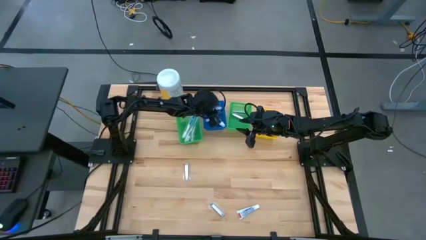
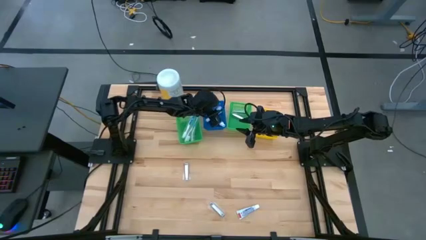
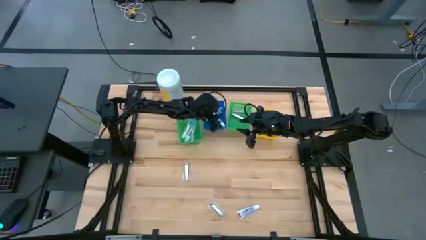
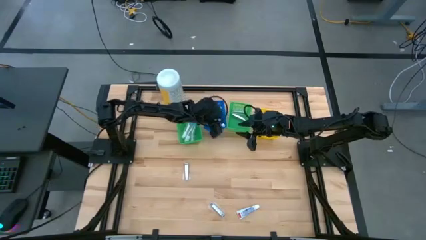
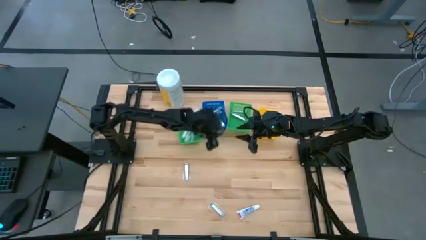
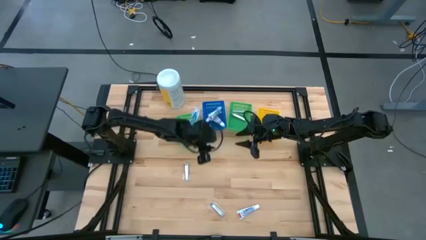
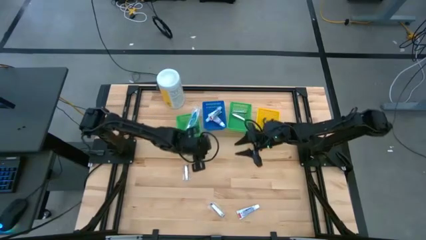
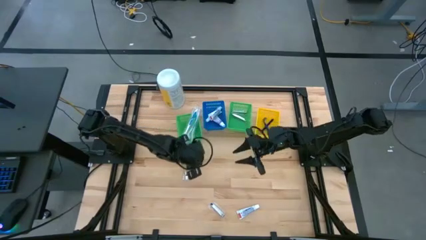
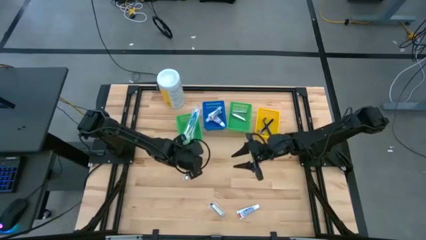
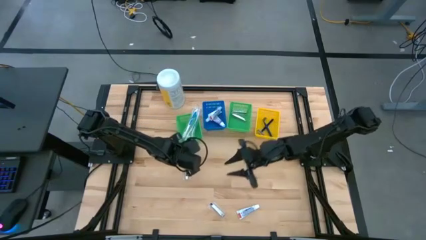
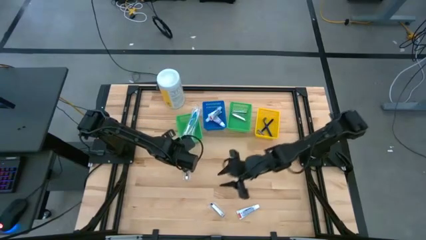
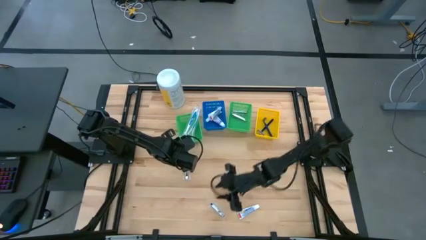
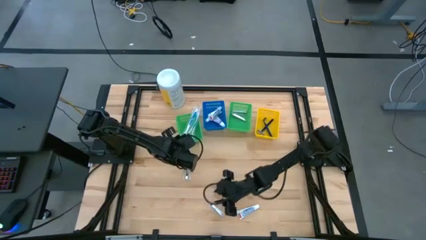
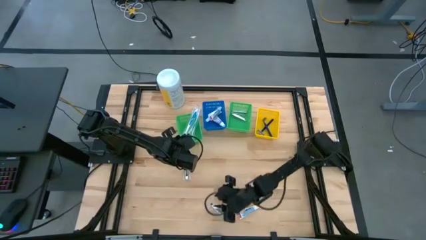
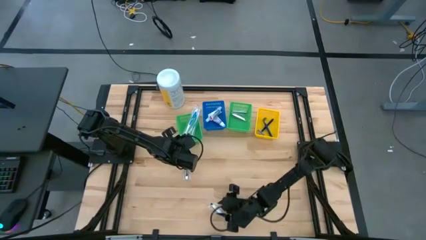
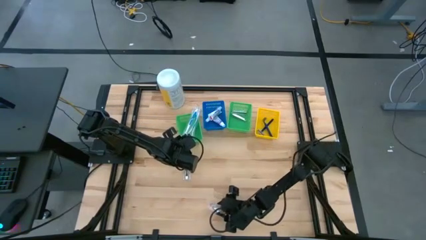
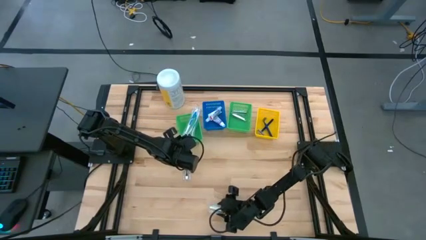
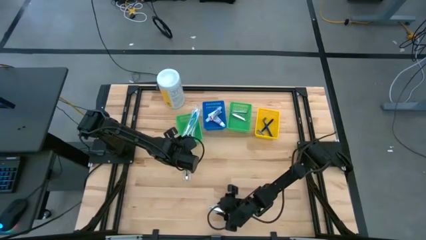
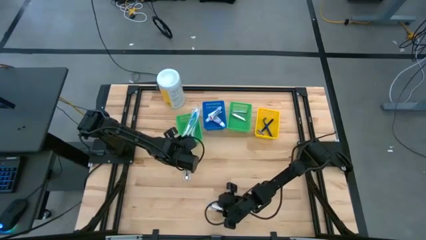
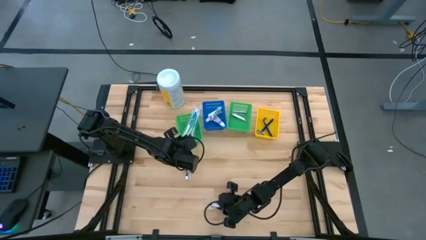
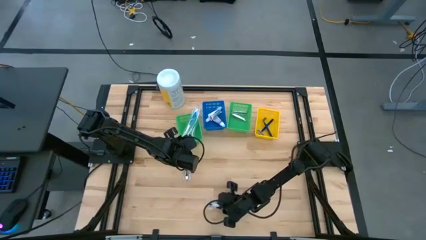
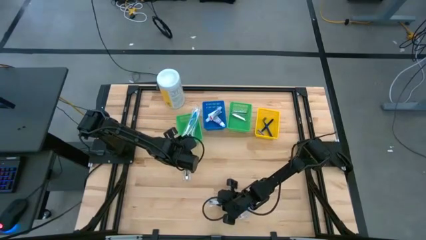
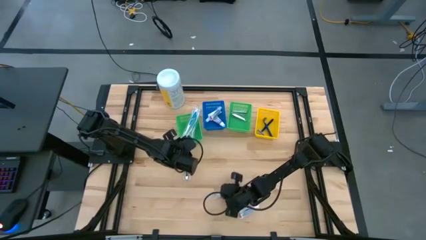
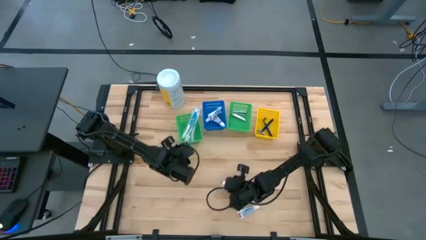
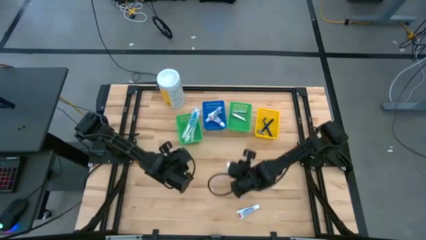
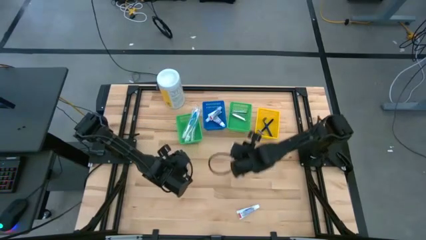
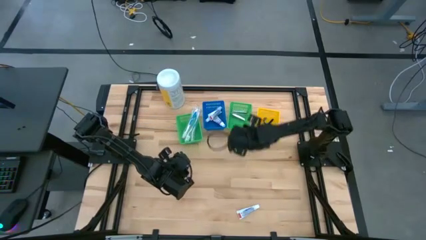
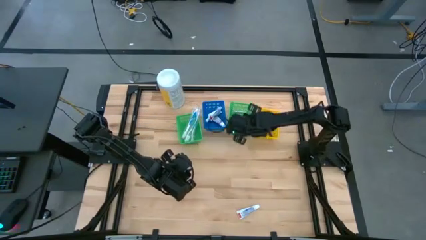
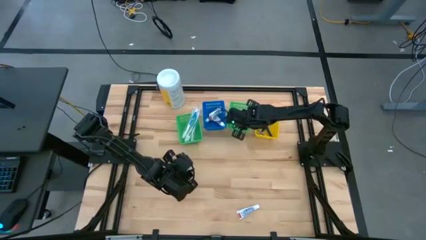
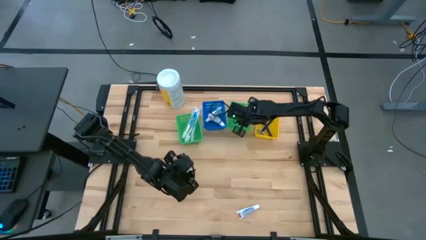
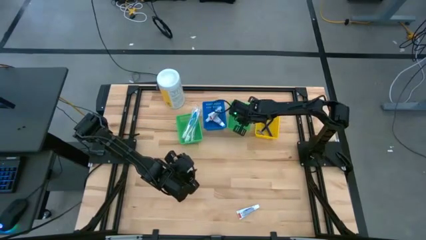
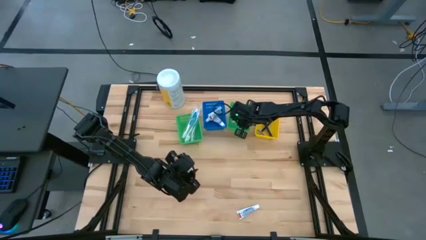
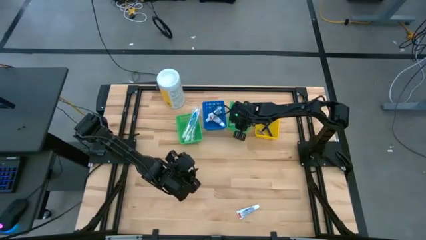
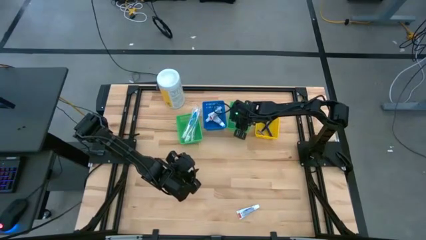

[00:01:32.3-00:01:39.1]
Task: Pick & Place Travel size toiletries
Put the silver nail cutter into the right green basket

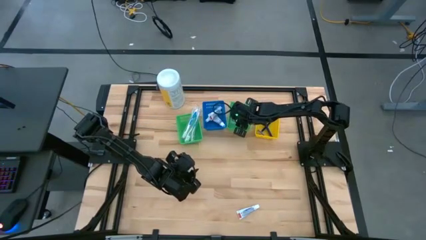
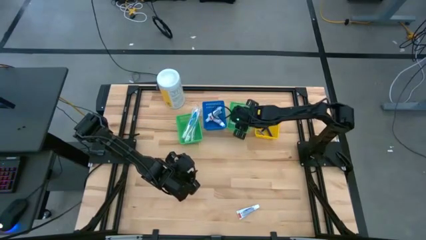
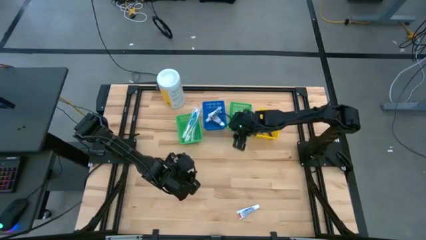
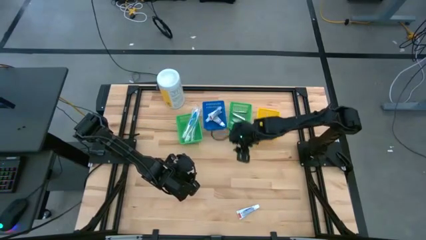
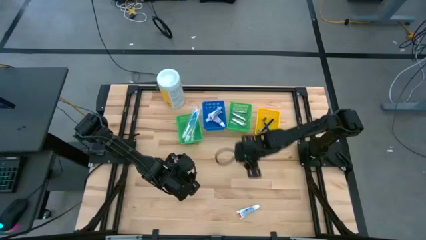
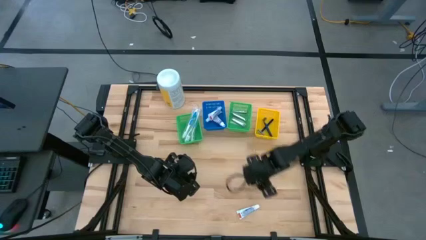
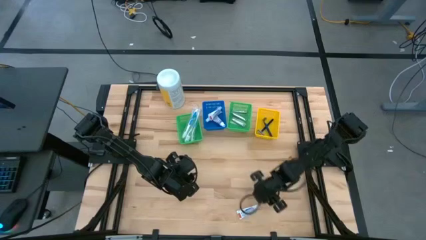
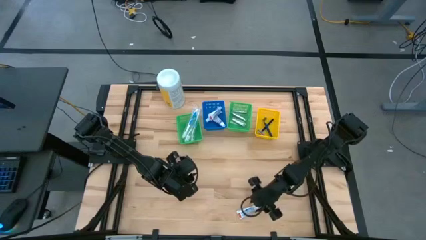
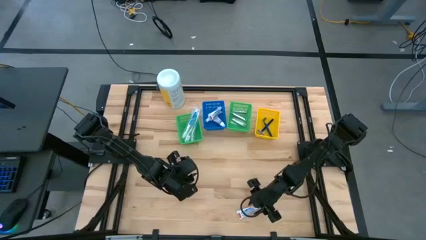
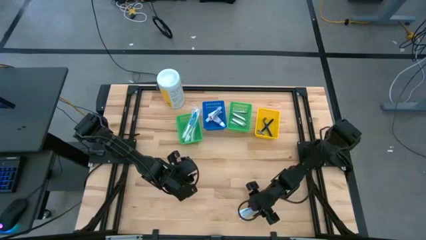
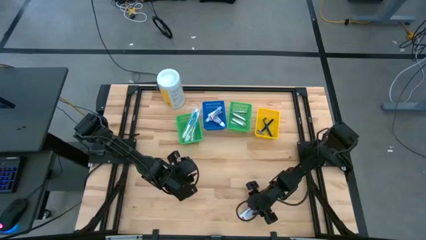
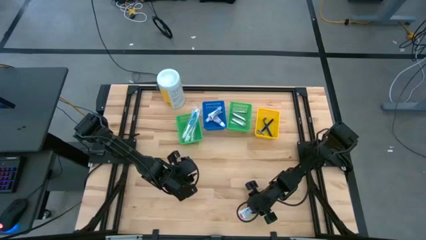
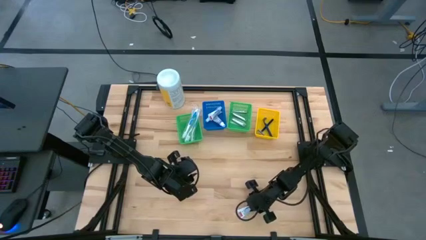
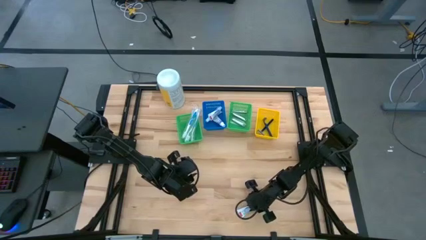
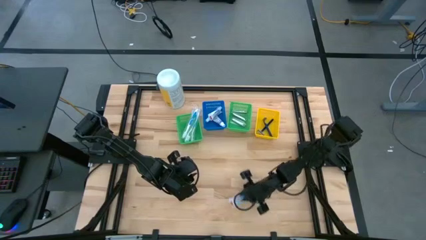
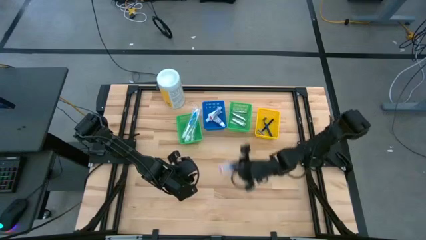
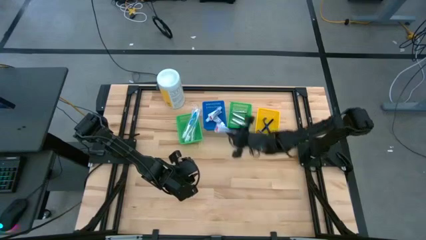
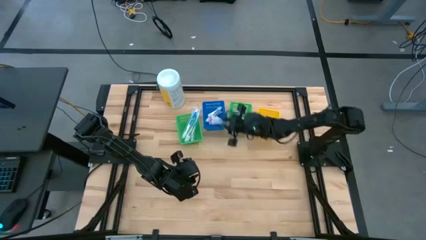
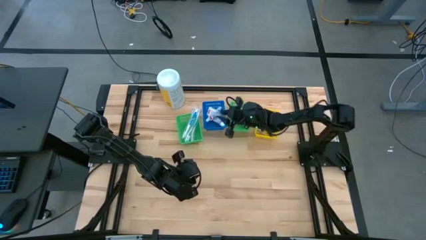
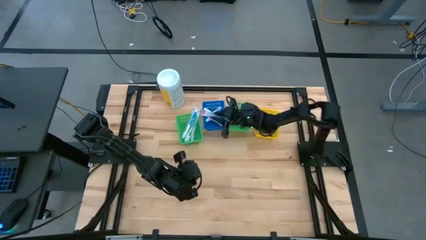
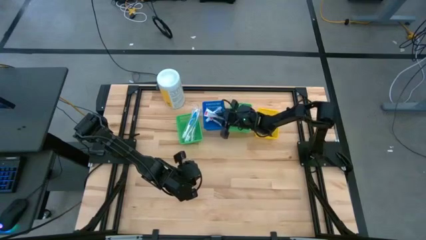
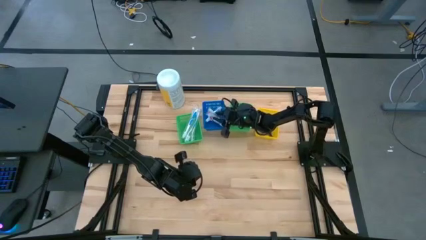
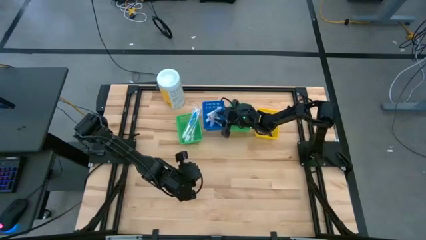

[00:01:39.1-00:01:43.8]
Put the white toothpaste into the blue basket

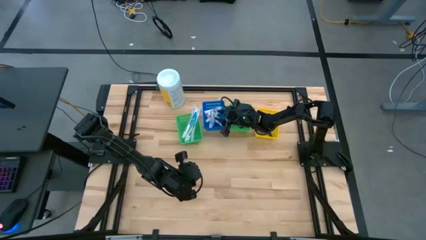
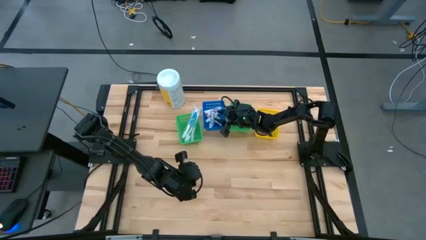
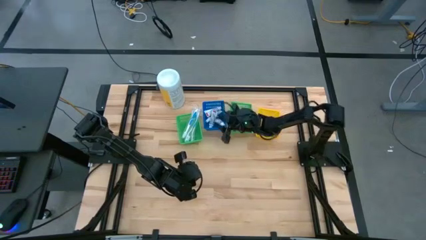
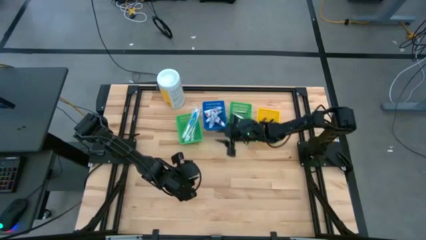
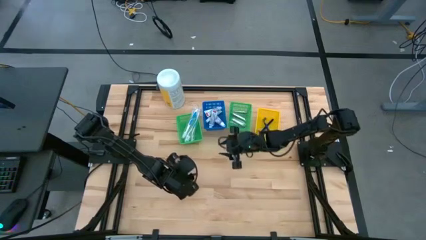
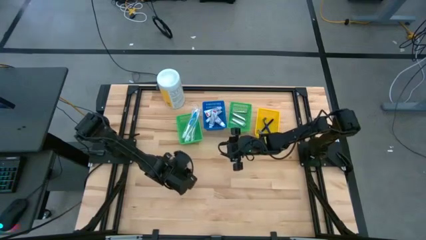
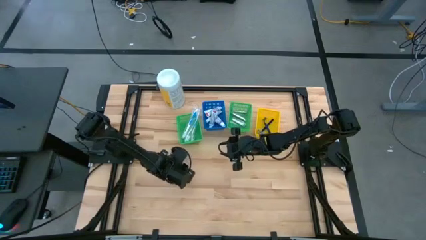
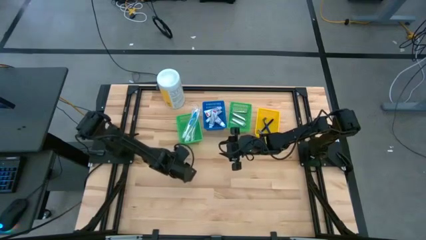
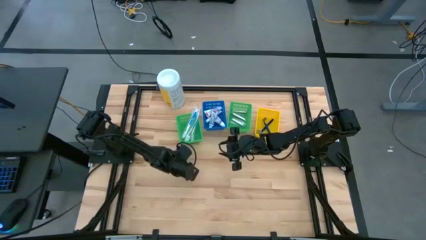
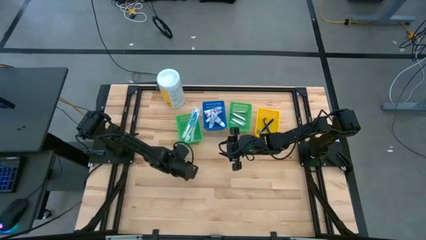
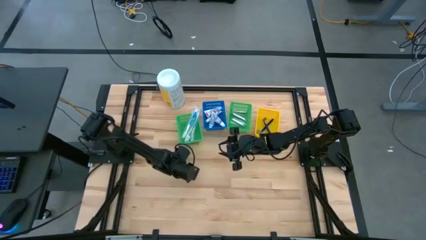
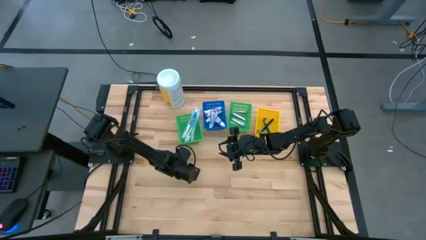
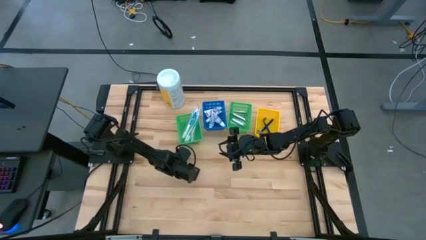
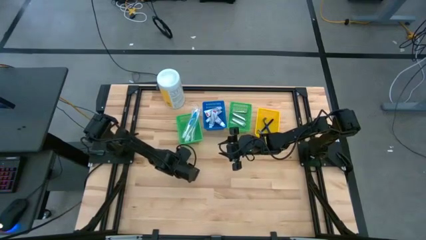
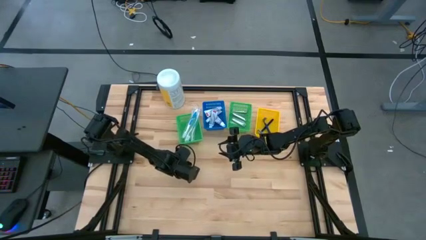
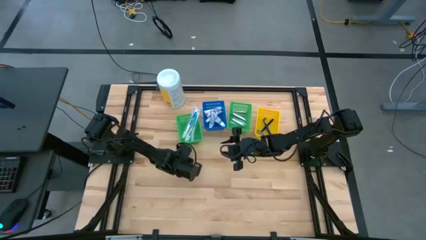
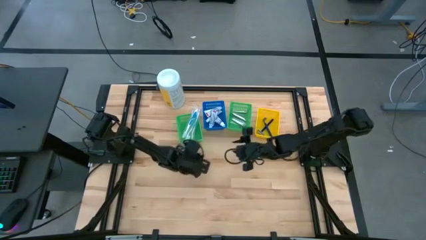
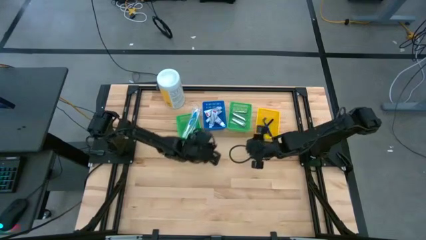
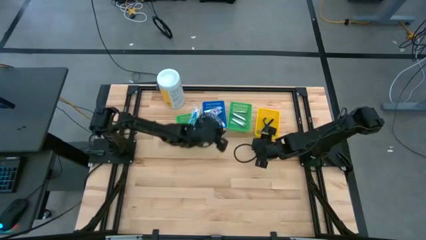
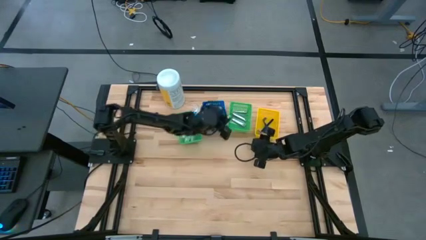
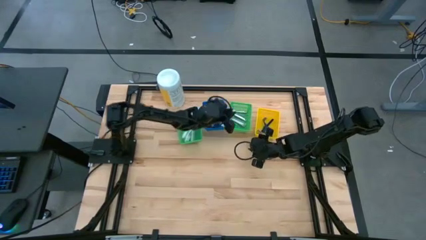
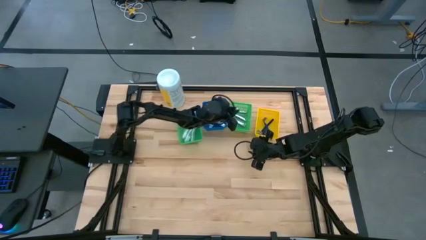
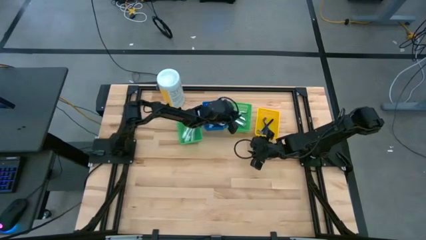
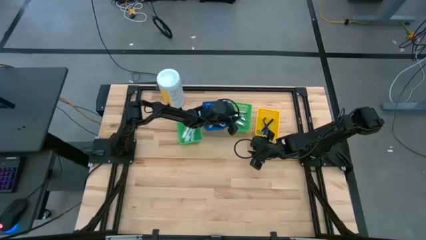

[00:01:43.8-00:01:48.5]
Put the silver nail cutter into the right green basket
